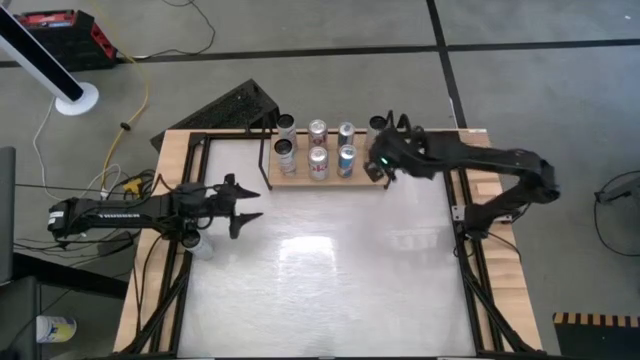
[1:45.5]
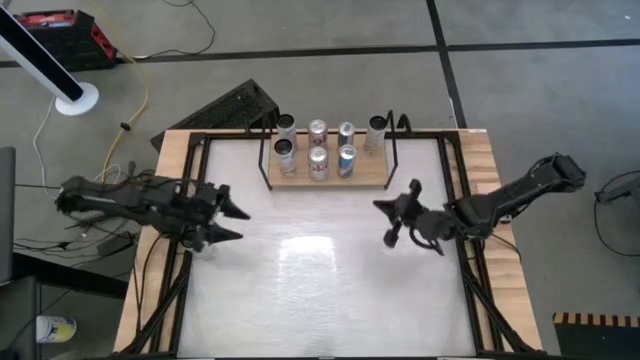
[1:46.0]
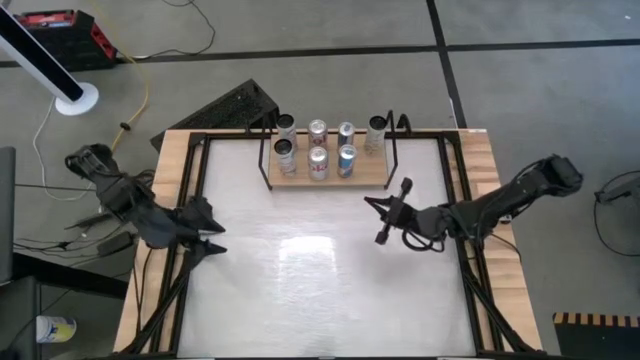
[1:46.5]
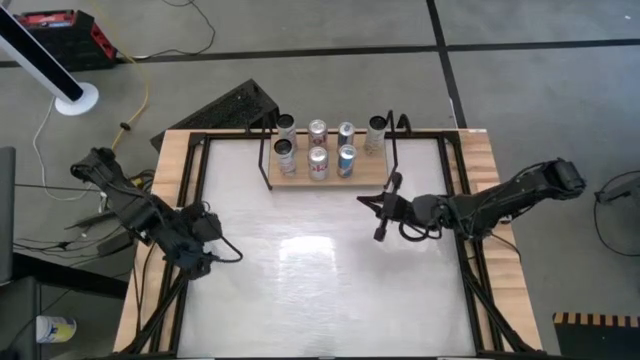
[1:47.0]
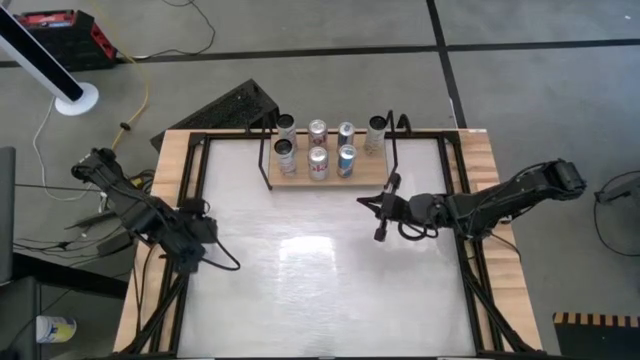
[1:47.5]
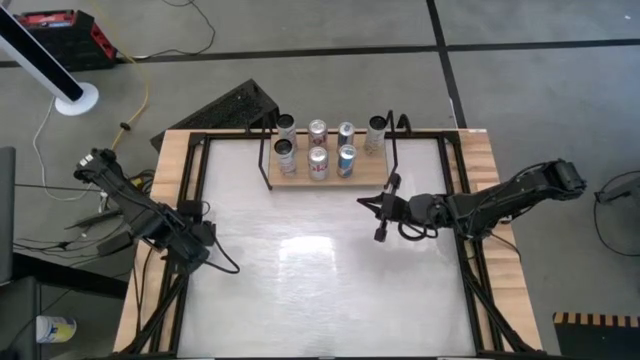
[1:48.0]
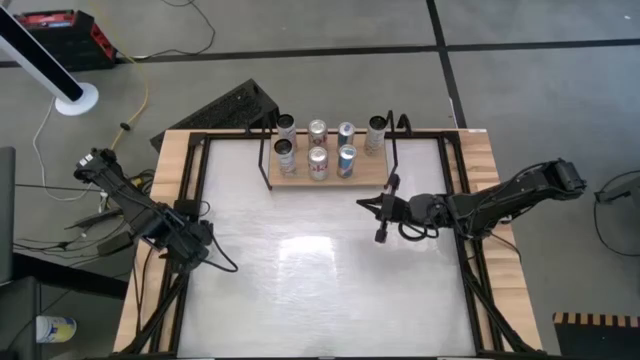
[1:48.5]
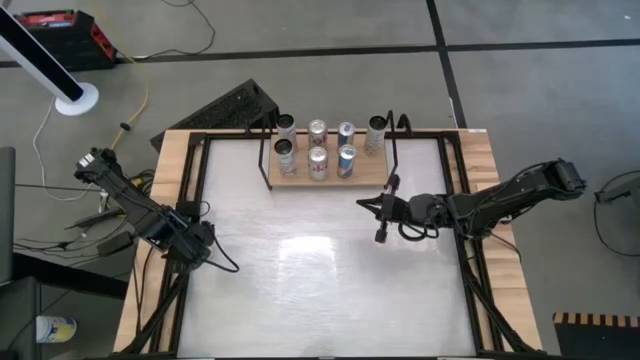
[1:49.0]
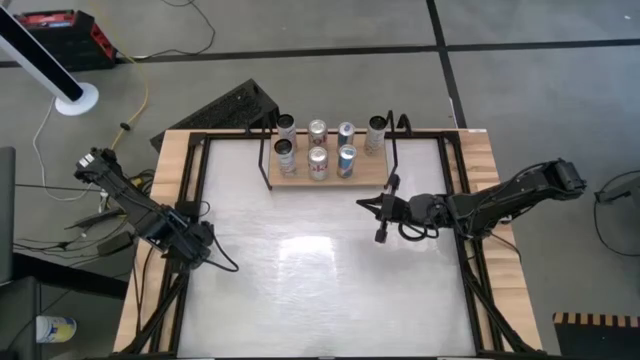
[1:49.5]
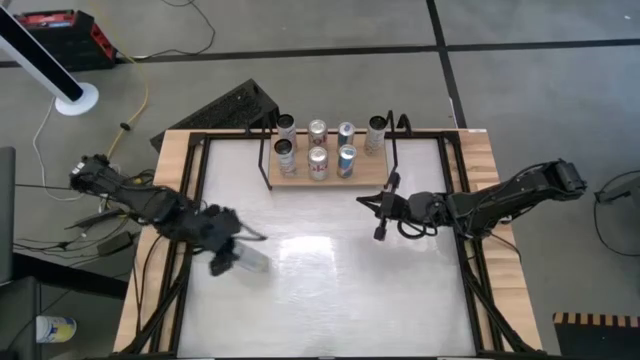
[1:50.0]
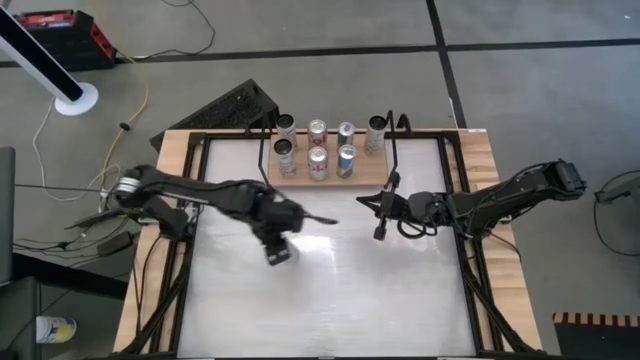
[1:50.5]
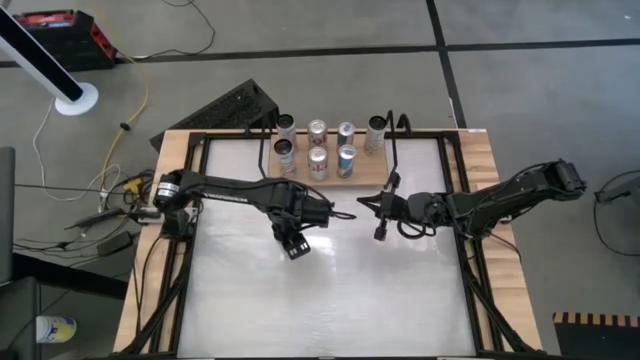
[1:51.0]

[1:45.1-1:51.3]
Task: Place canned beverage on shelf
Put the white-yellow soda can on the shelf aligned with the other white-yellow soda can

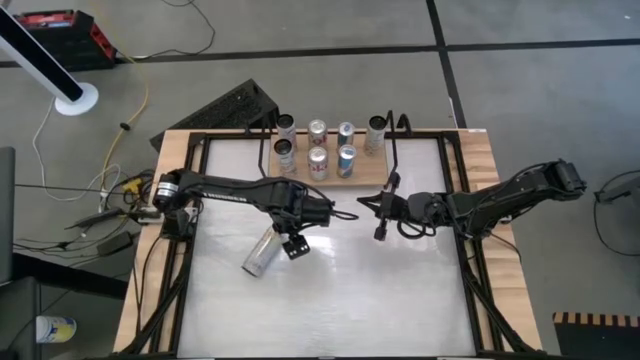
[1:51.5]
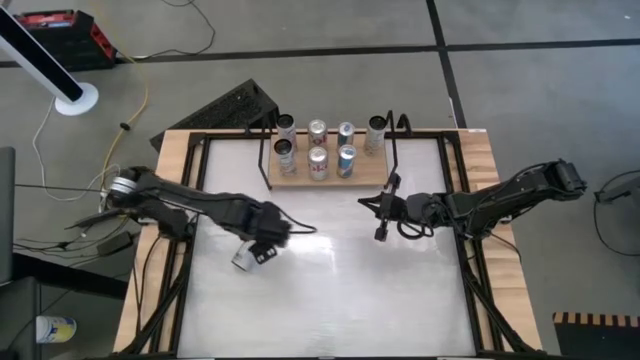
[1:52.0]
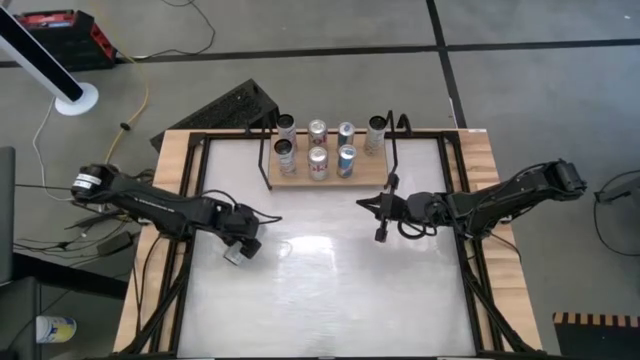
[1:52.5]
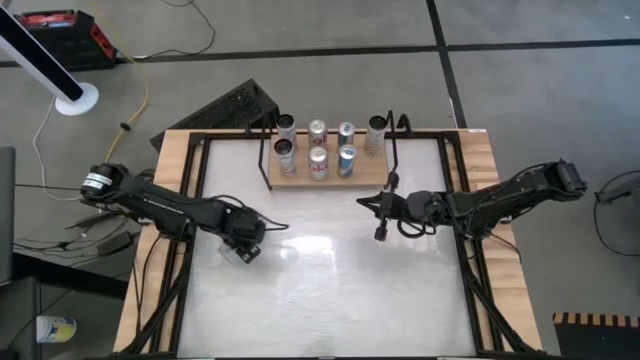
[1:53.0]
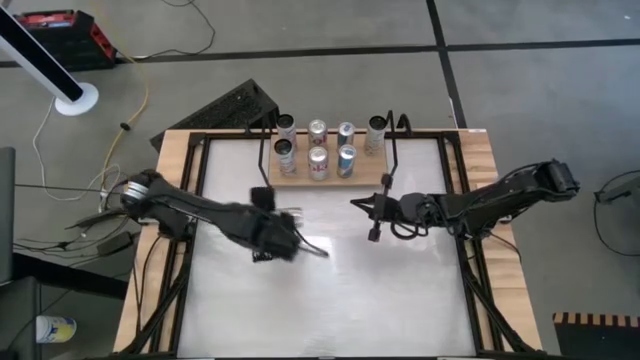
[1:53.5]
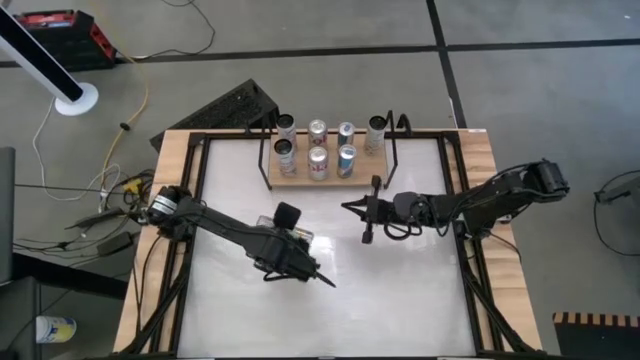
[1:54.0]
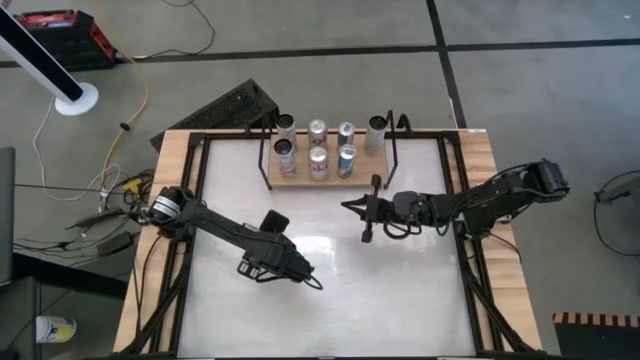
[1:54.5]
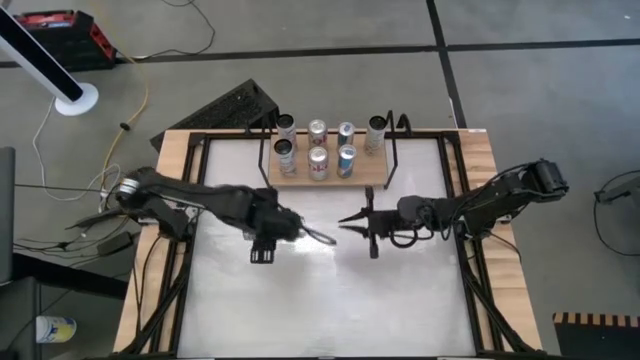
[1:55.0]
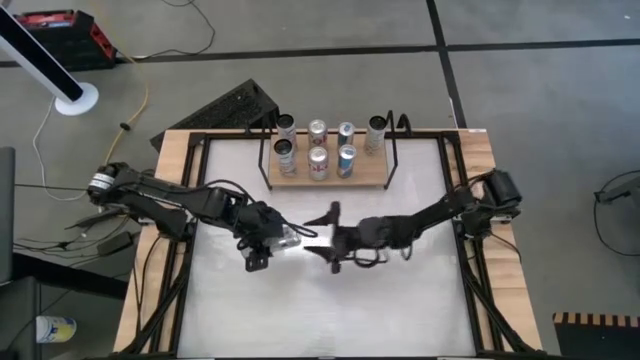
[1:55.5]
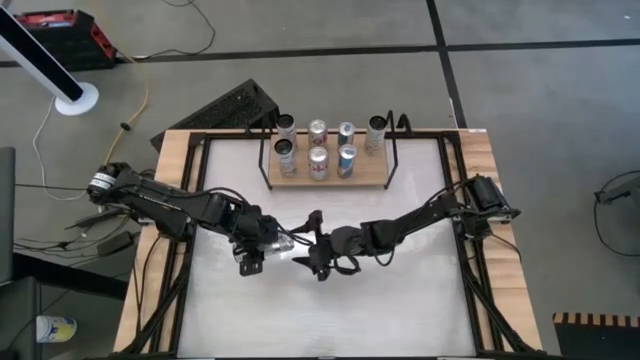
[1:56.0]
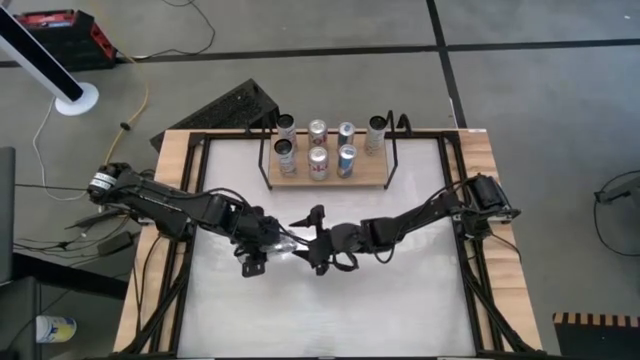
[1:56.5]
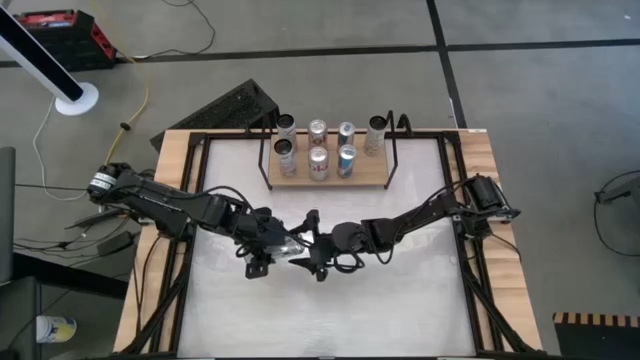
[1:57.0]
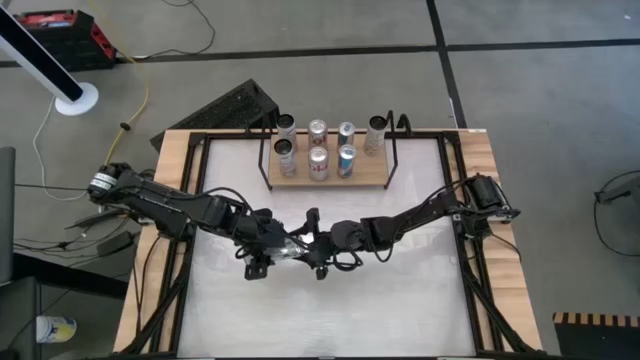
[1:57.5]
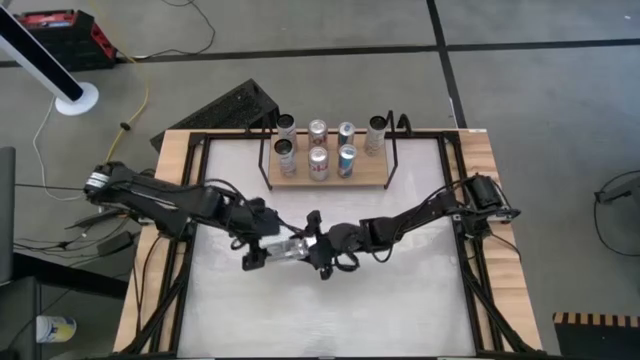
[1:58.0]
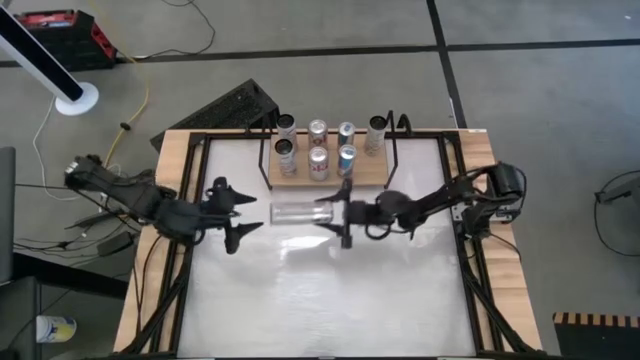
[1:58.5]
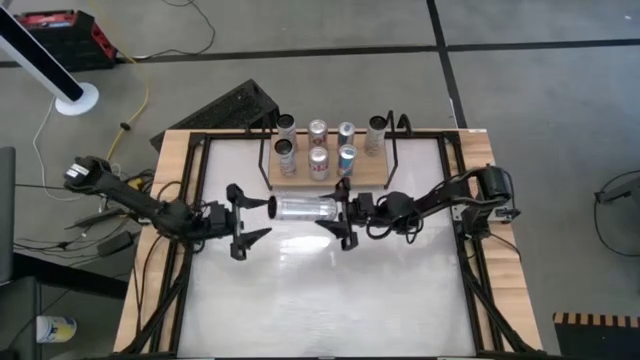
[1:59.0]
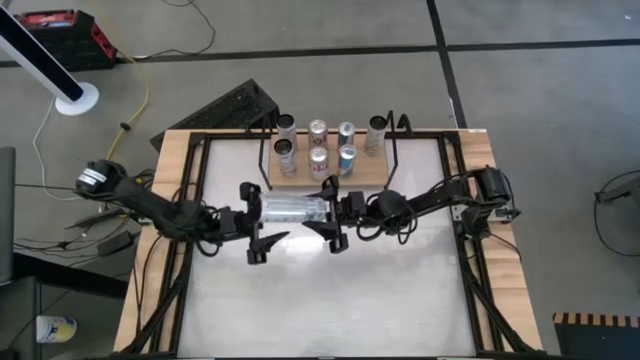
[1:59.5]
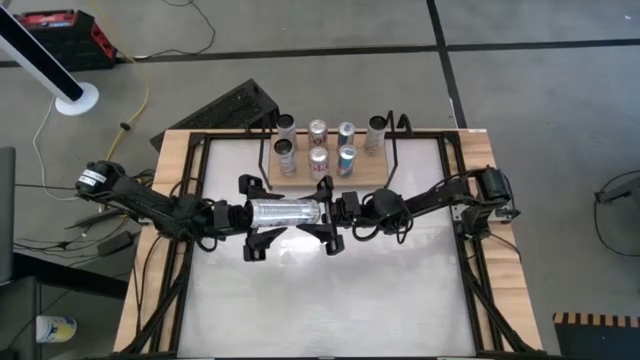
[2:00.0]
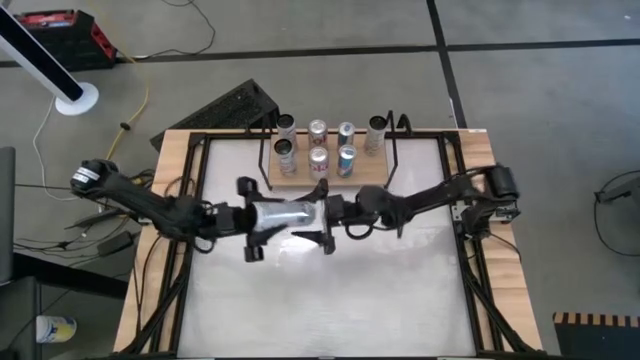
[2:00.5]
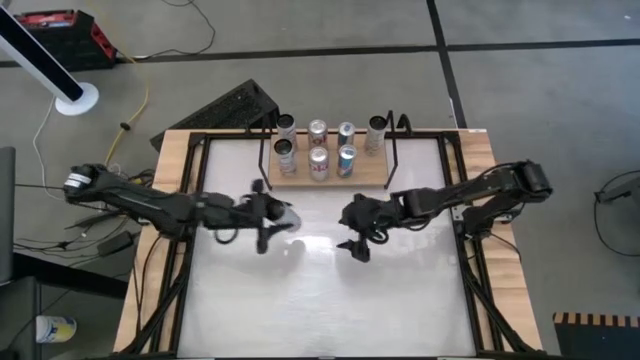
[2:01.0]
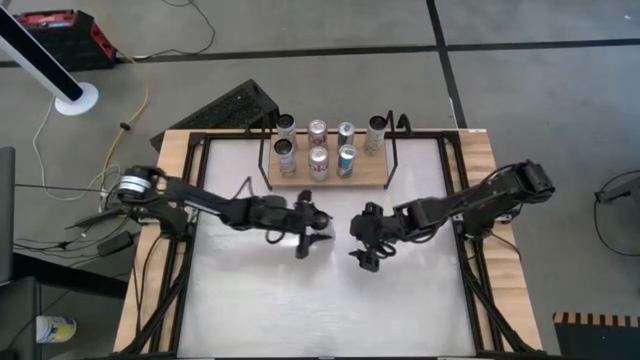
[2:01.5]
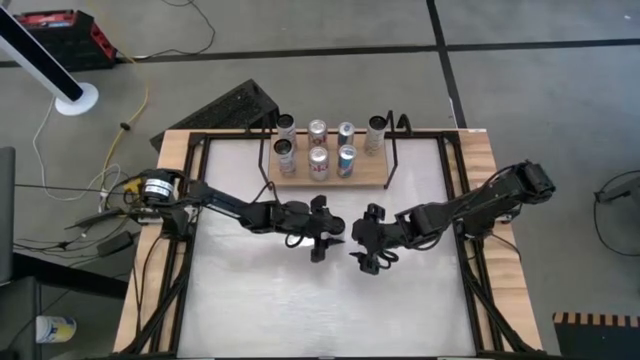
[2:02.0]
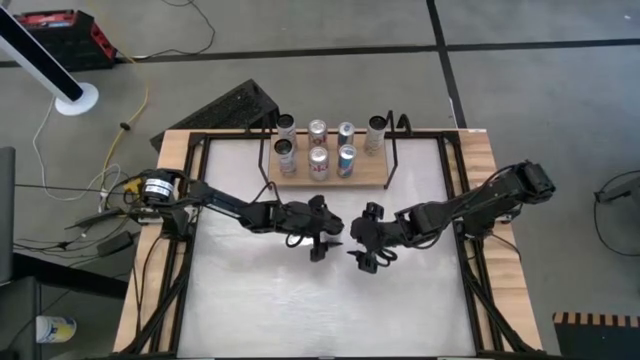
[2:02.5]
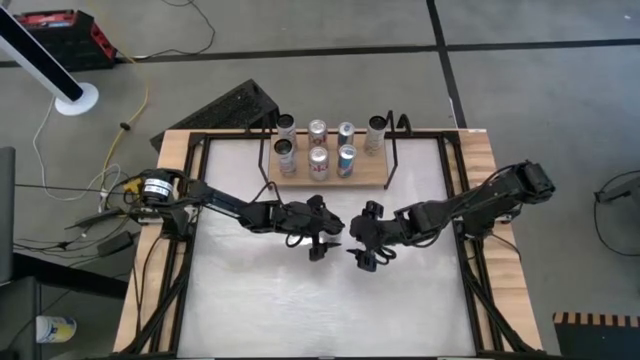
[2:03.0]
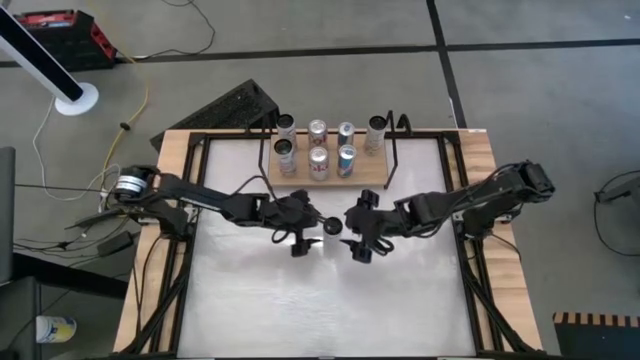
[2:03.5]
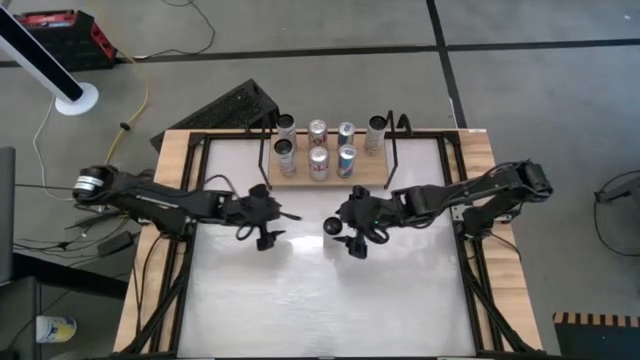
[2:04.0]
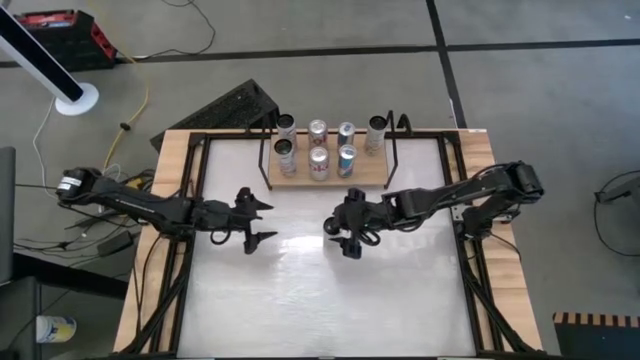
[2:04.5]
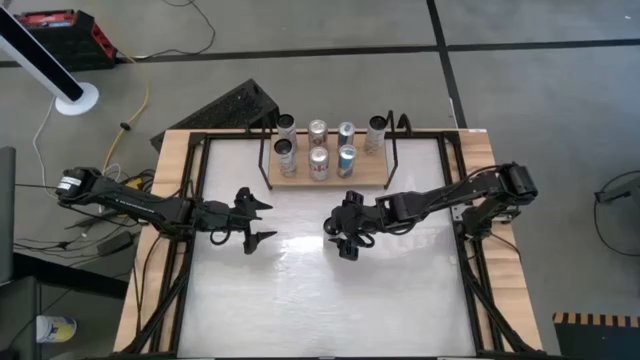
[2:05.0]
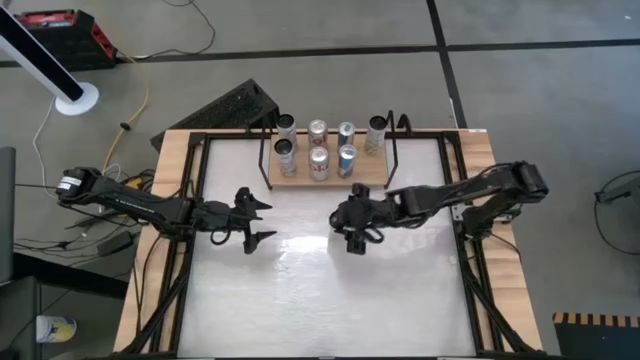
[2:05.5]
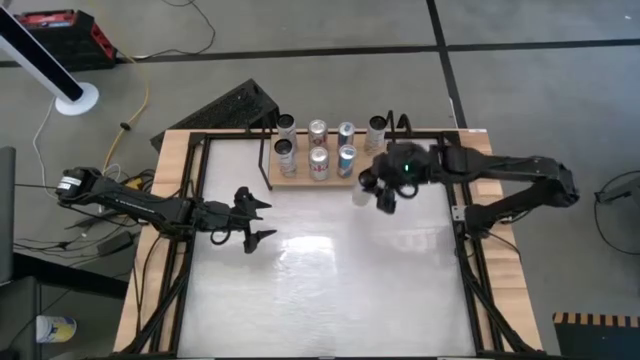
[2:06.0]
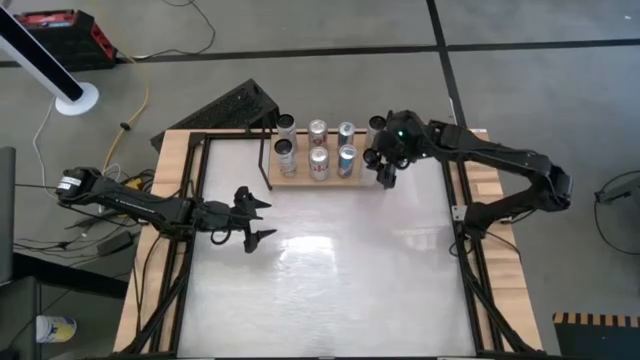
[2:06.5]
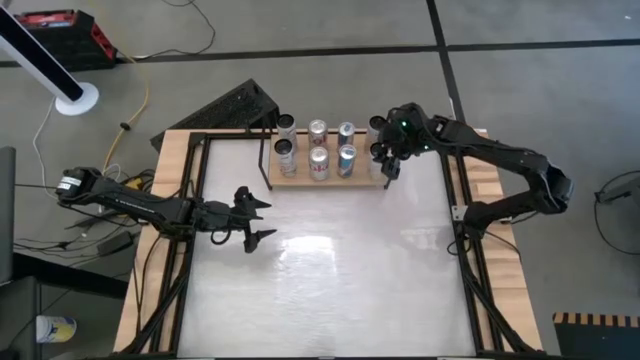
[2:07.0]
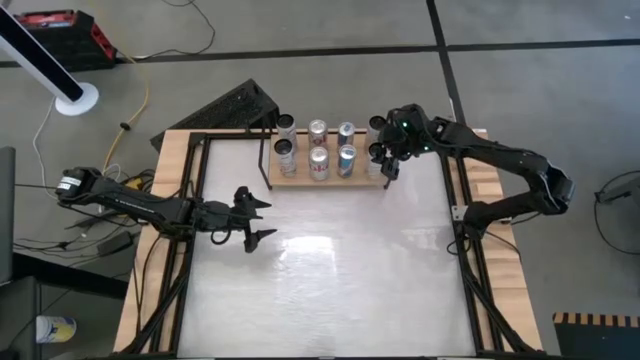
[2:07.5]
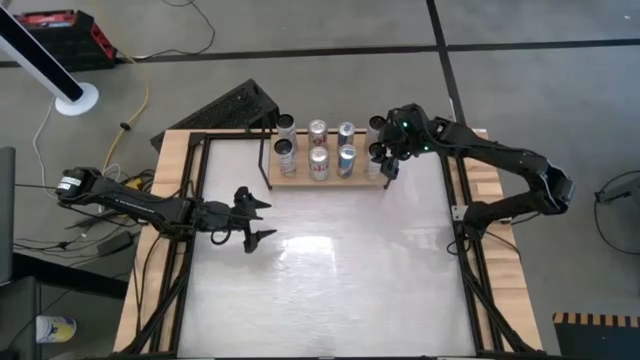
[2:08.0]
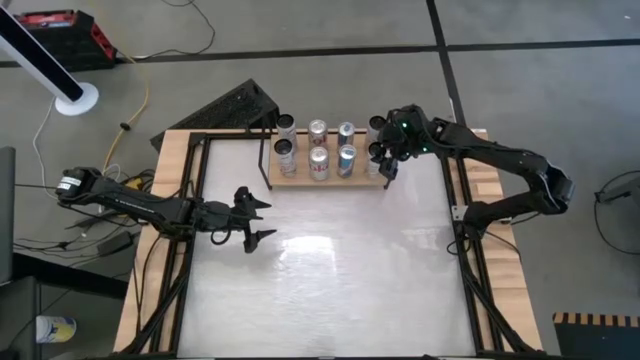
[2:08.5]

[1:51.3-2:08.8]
Put the white-yellow soda can on the shelf aligned with the other white-yellow soda can
